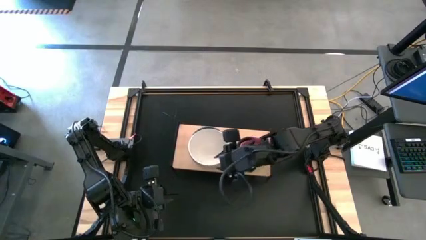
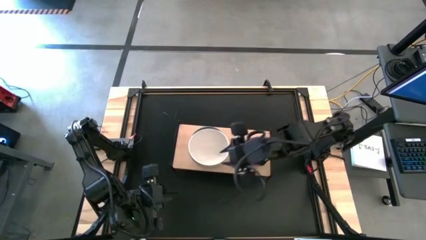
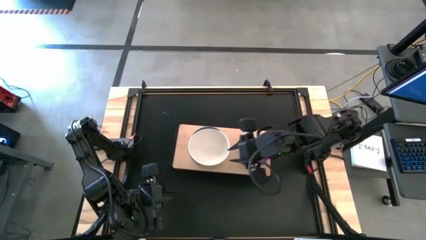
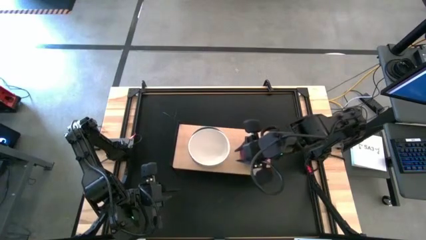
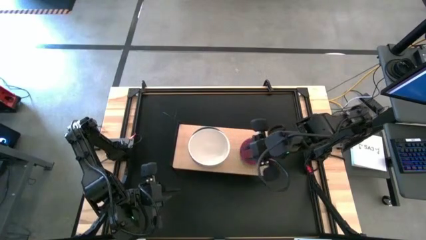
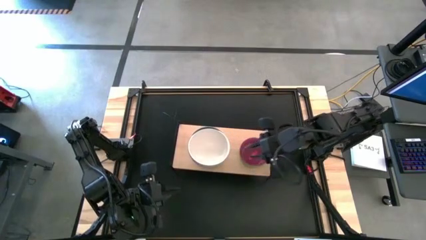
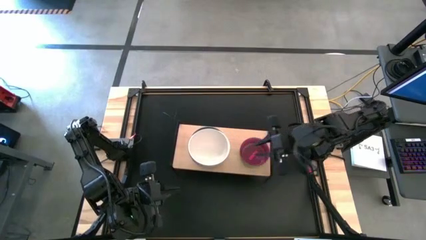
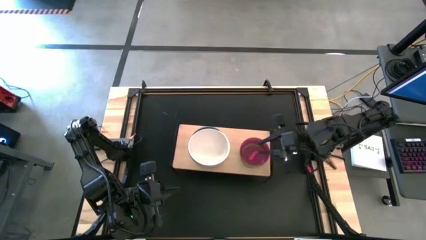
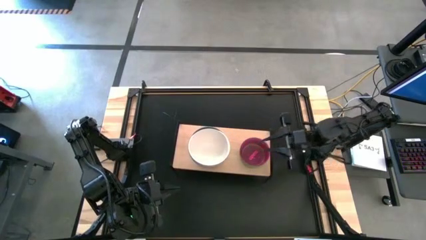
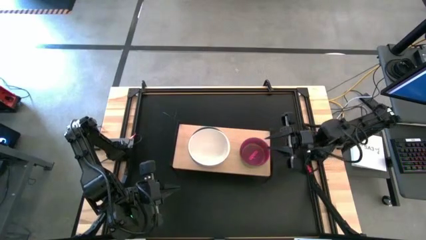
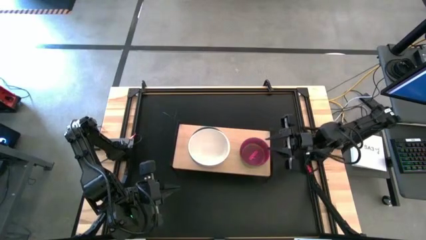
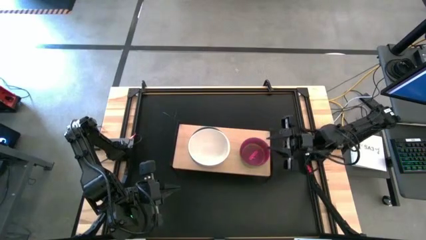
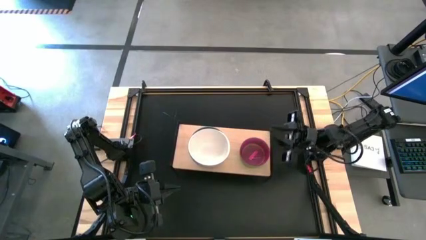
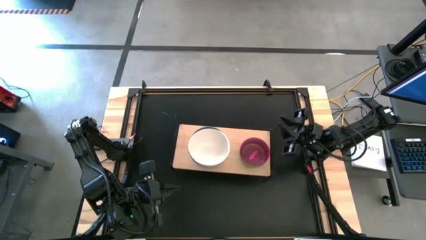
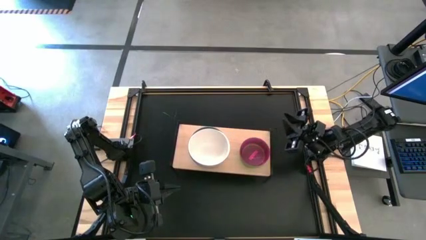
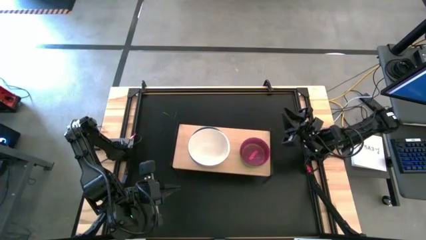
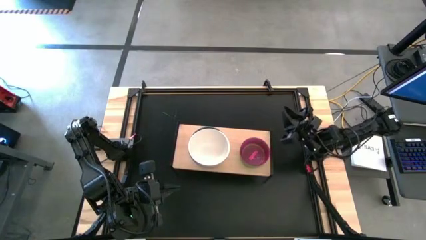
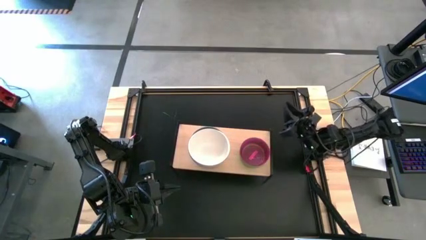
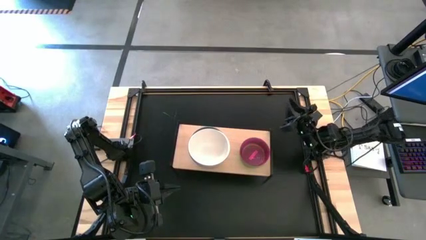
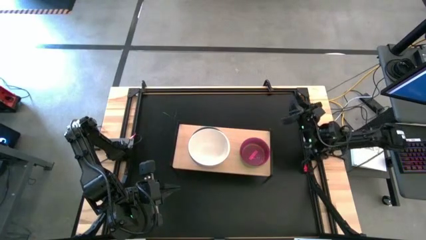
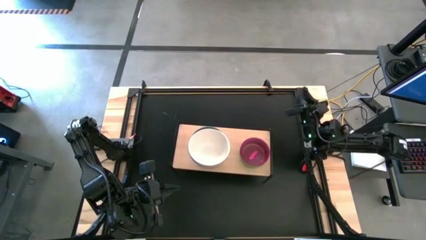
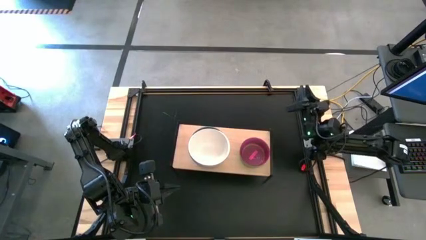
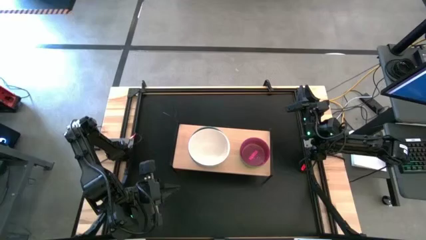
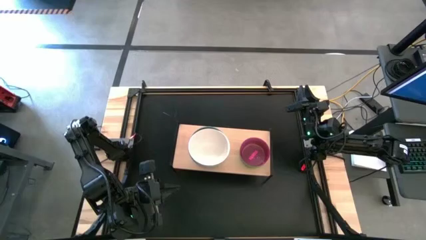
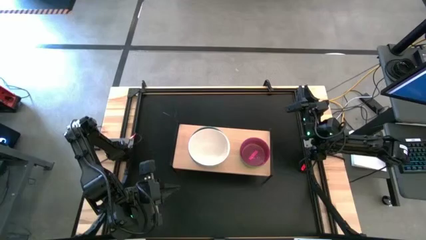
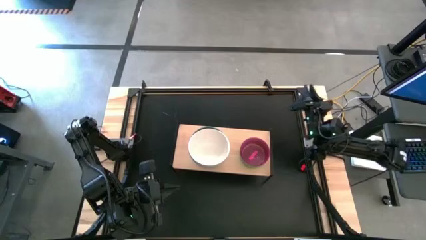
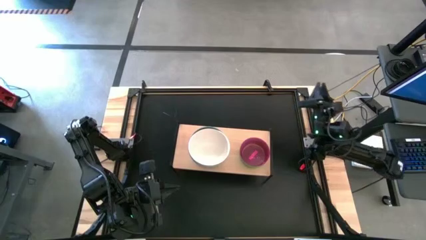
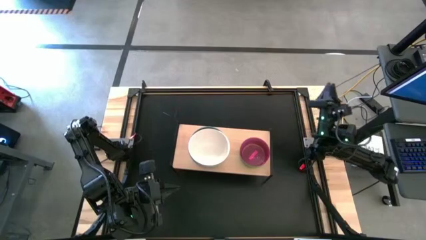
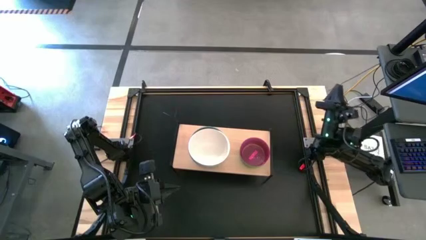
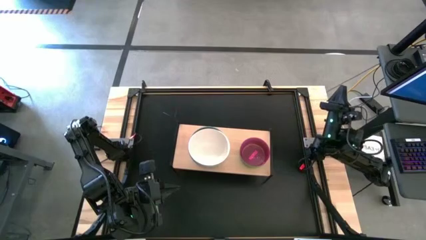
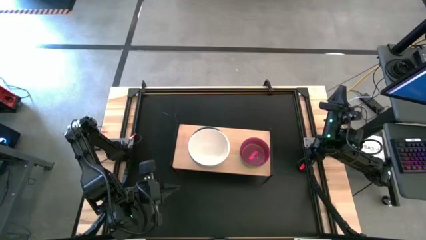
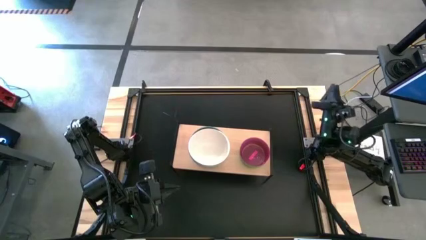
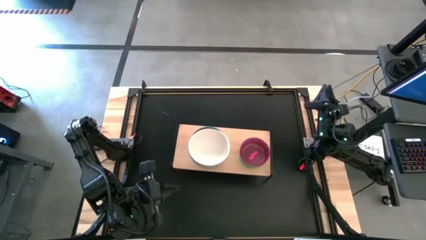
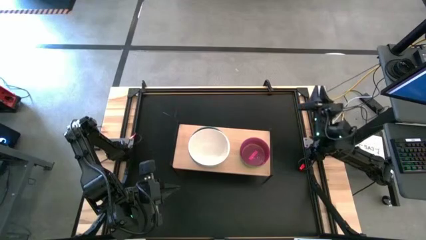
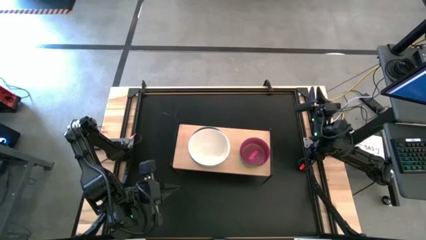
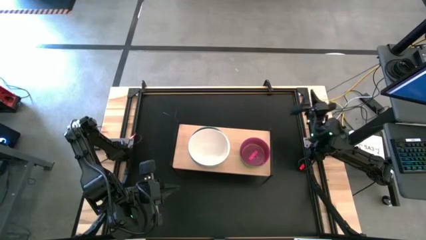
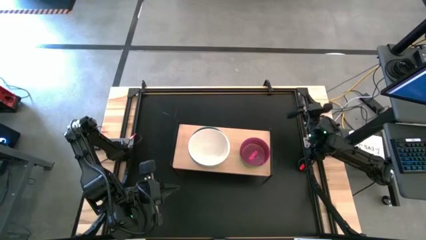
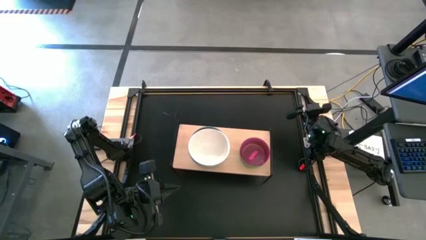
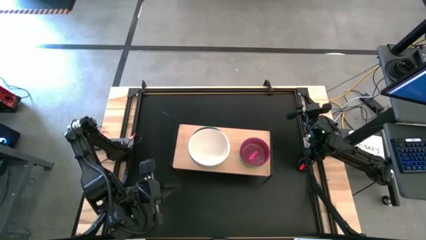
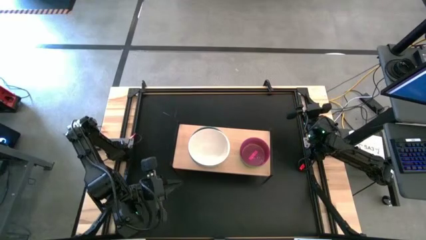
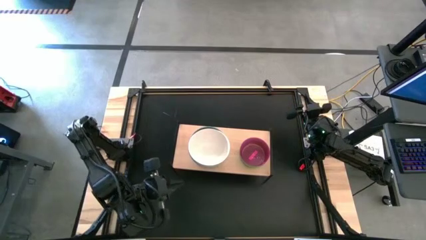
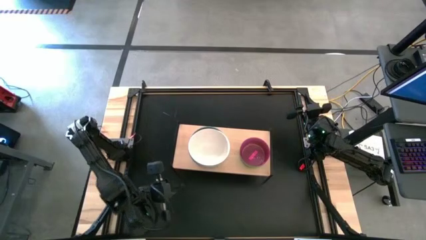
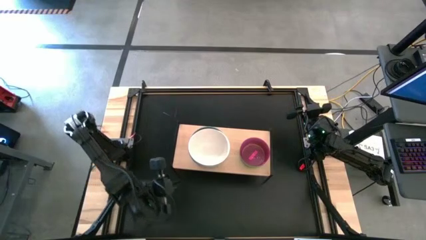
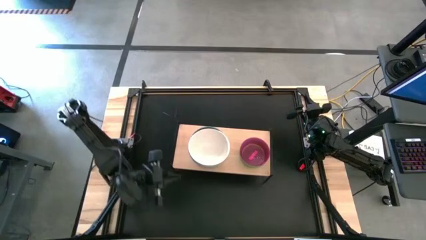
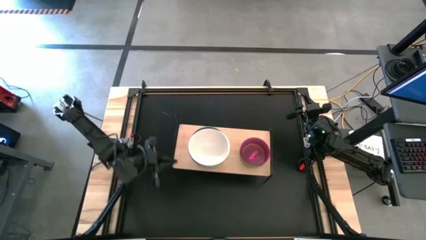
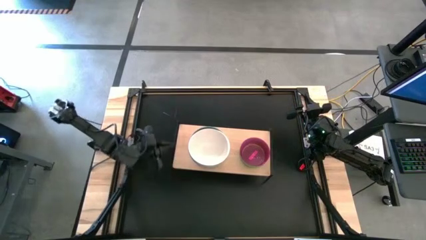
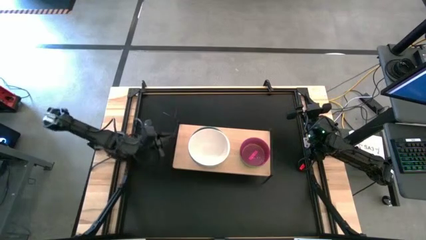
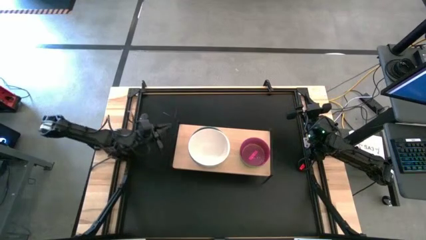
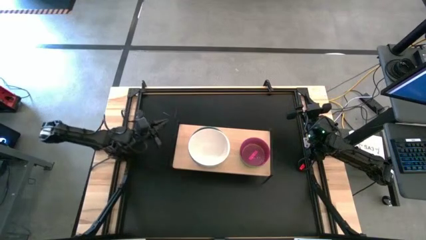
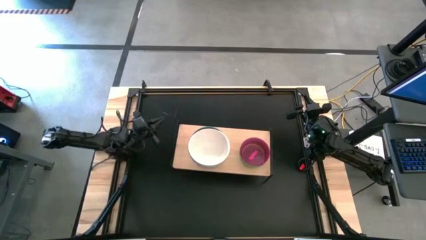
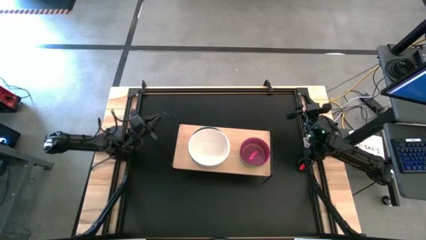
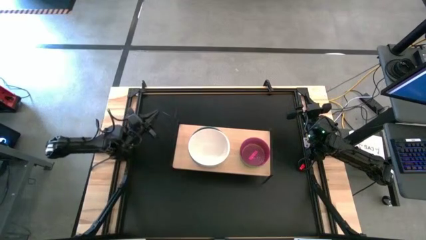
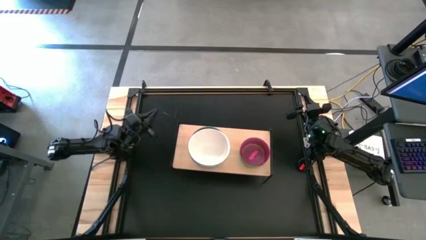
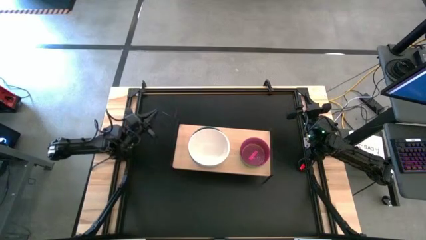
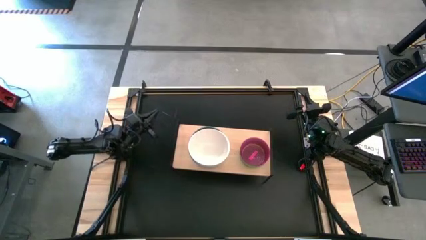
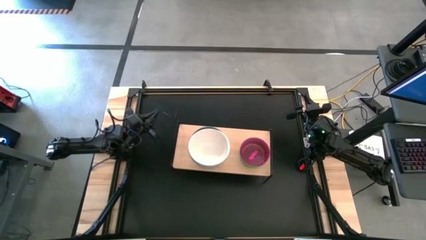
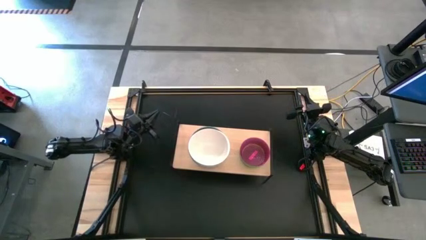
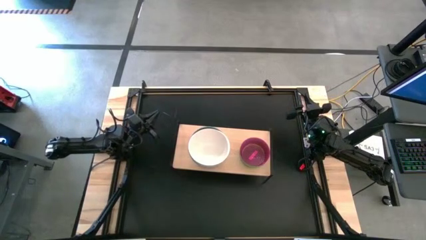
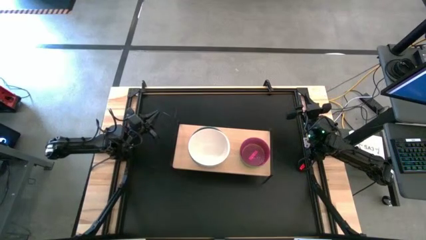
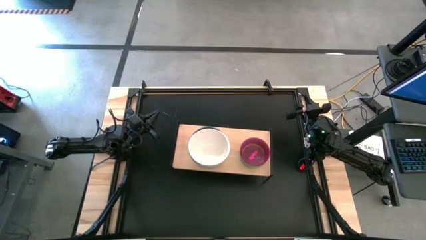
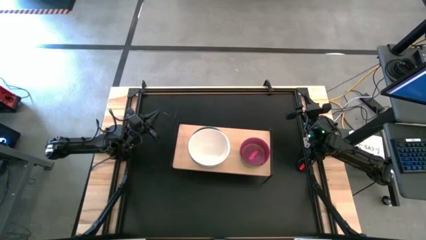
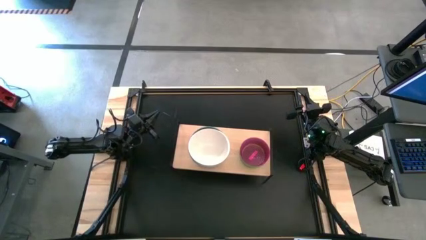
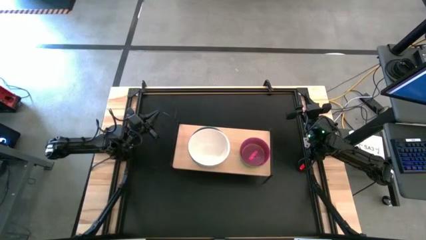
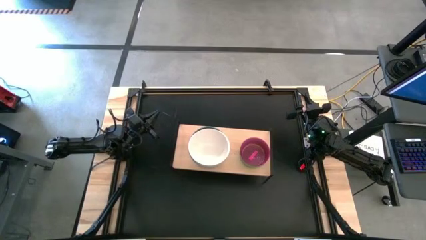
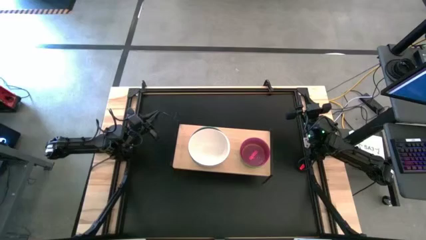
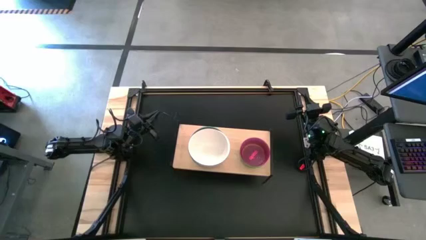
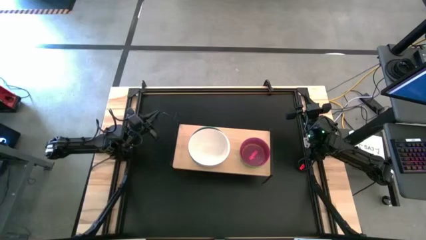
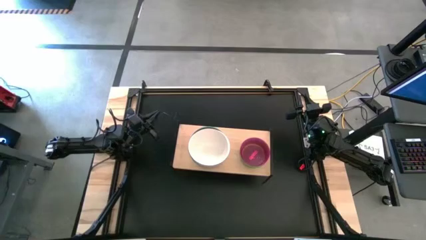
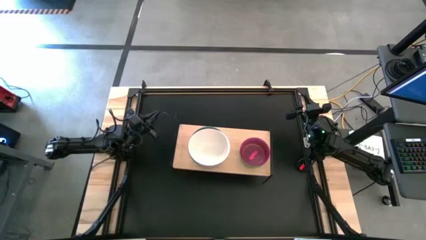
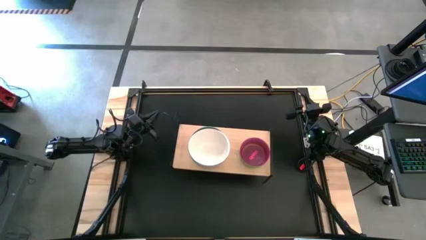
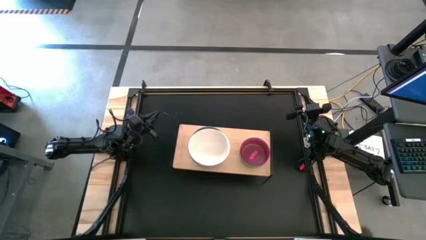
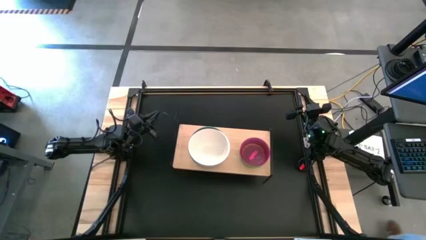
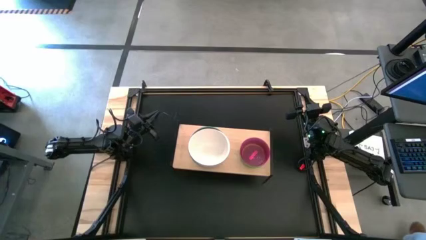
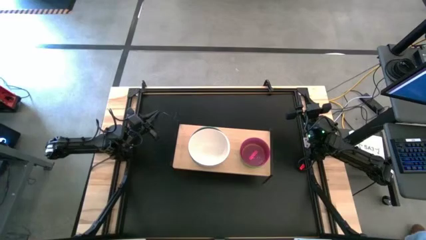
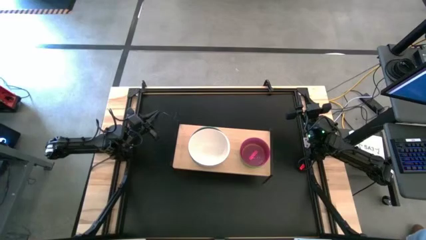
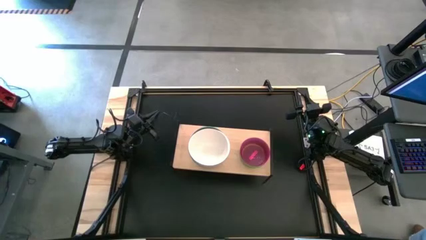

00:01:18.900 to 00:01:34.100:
Task: Place and stack bowls onto a shelf
Return to Home Position
